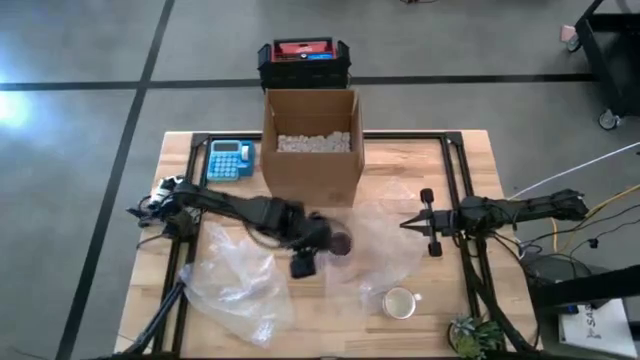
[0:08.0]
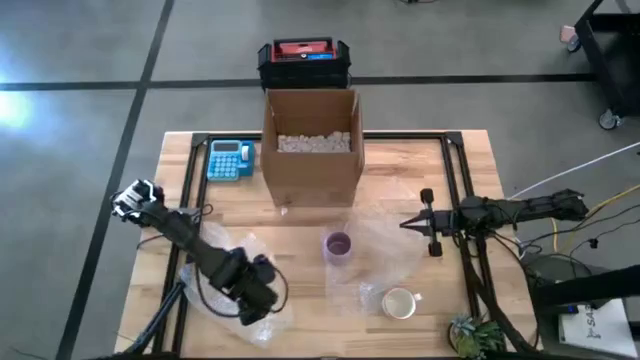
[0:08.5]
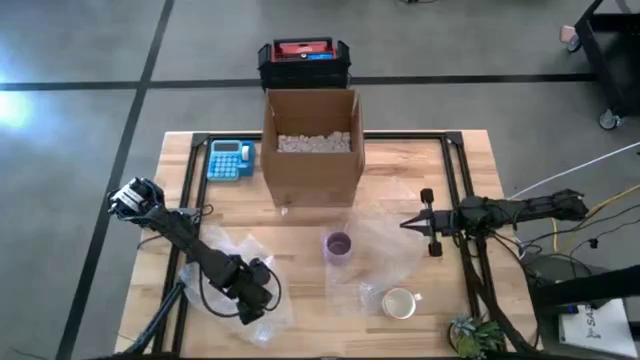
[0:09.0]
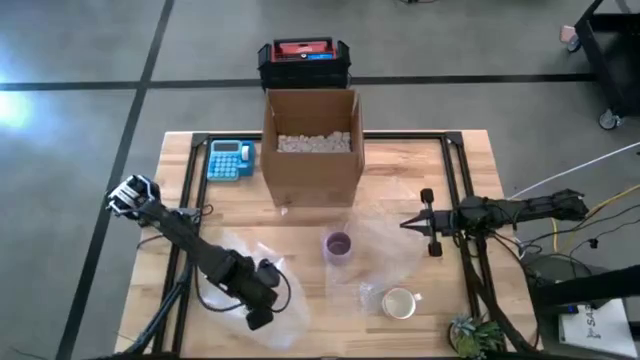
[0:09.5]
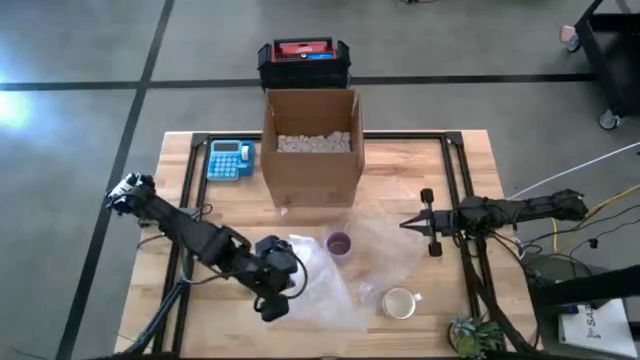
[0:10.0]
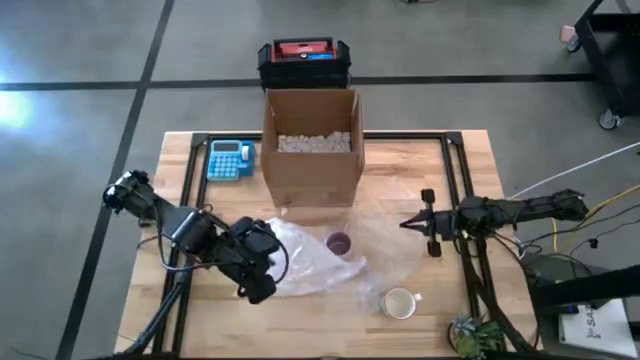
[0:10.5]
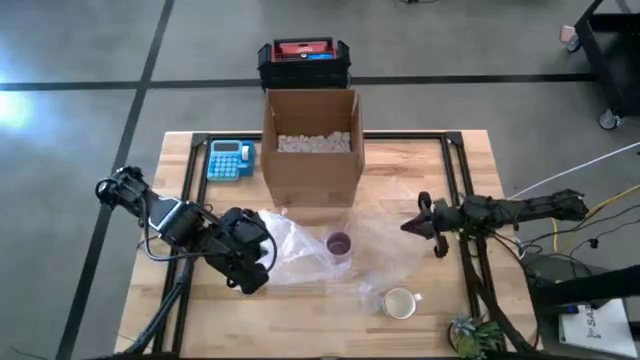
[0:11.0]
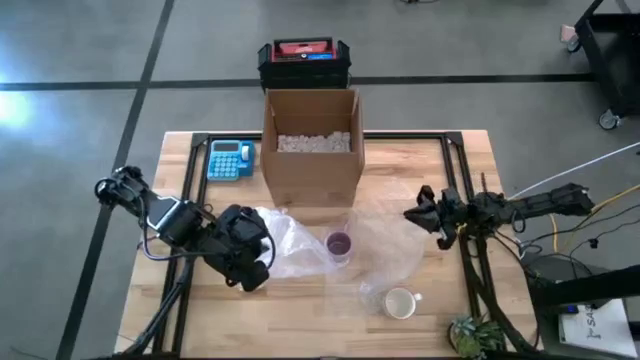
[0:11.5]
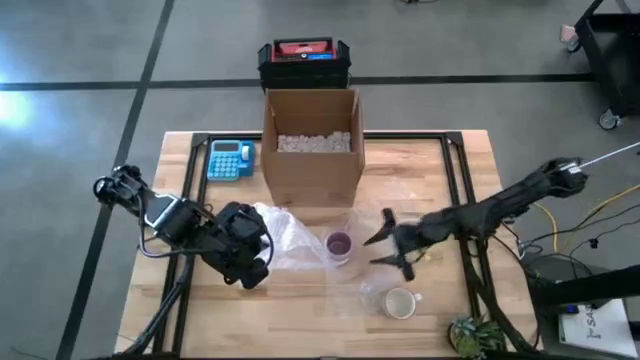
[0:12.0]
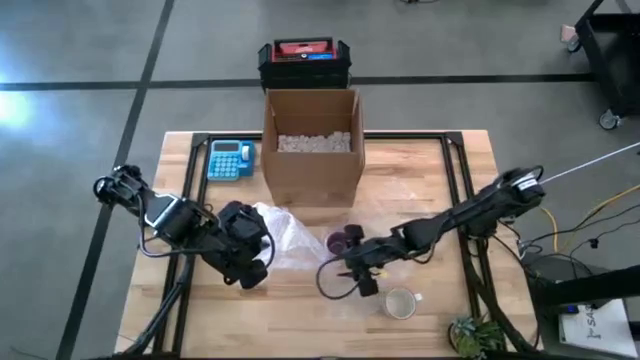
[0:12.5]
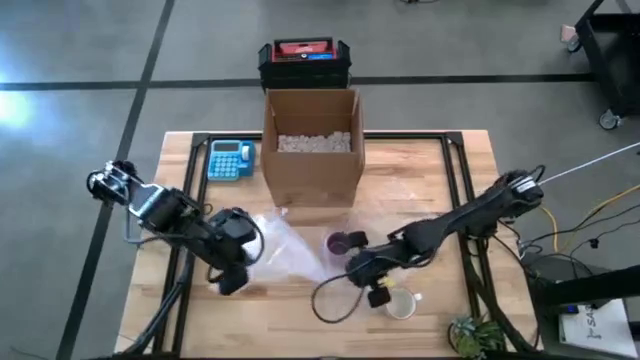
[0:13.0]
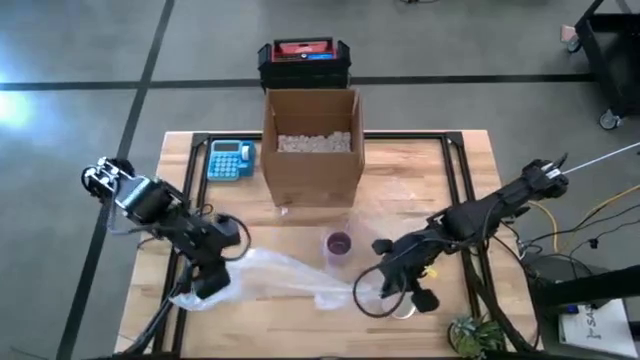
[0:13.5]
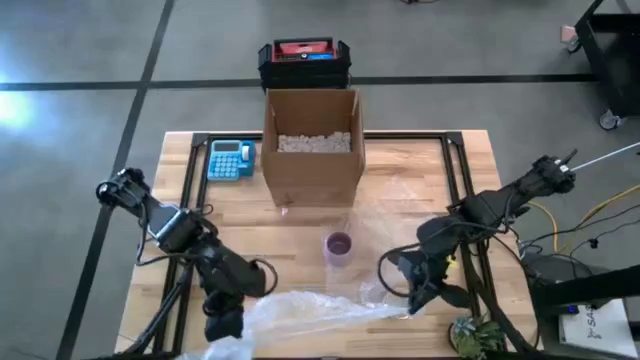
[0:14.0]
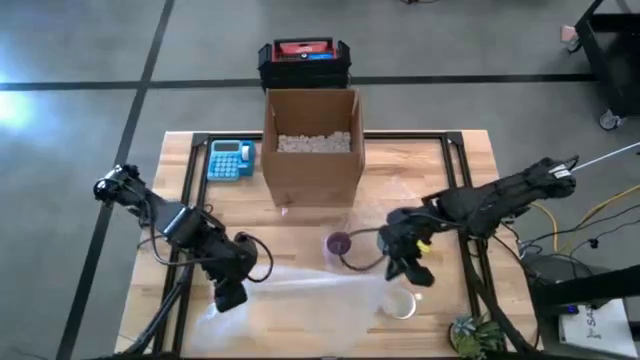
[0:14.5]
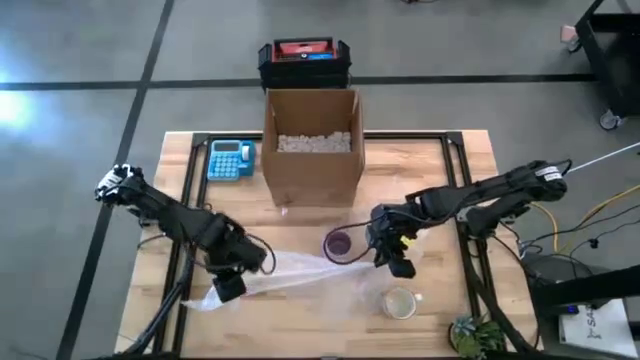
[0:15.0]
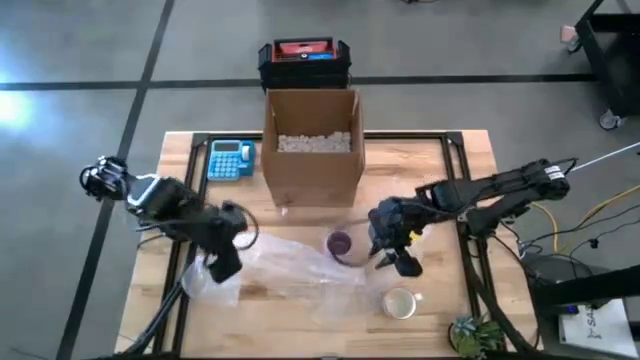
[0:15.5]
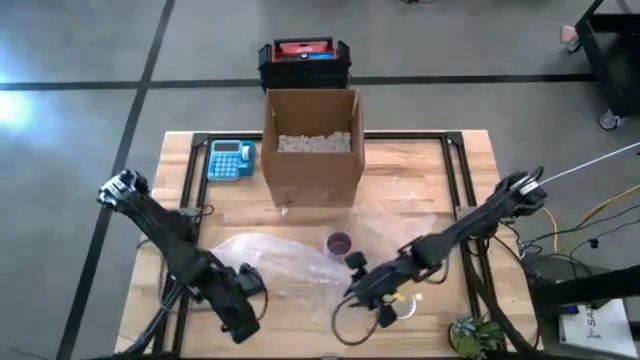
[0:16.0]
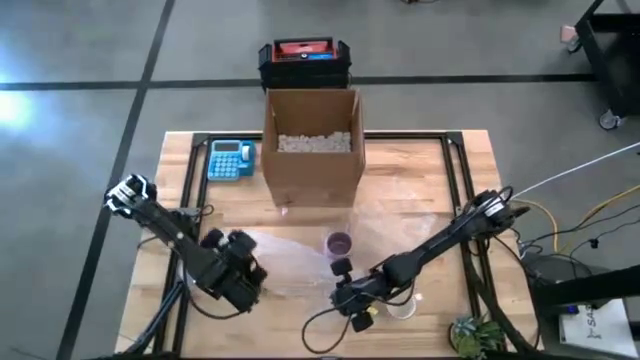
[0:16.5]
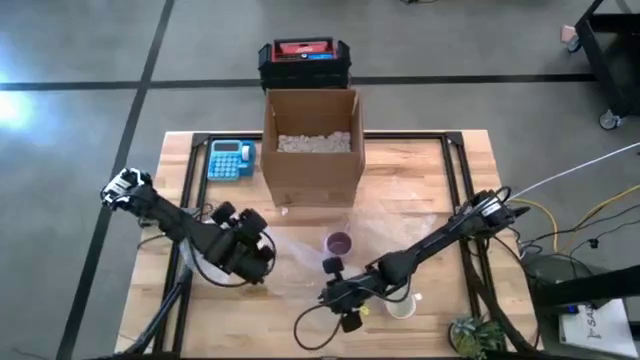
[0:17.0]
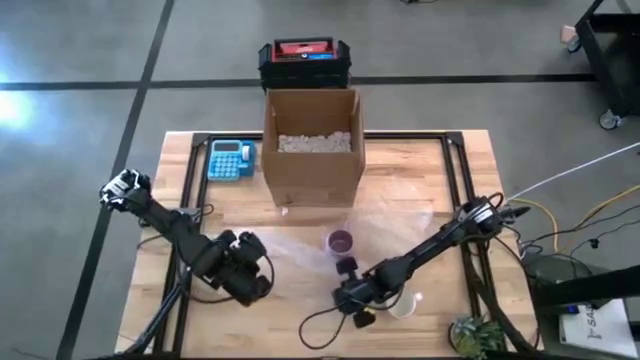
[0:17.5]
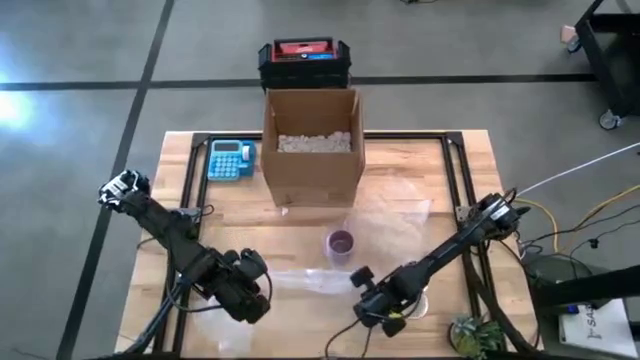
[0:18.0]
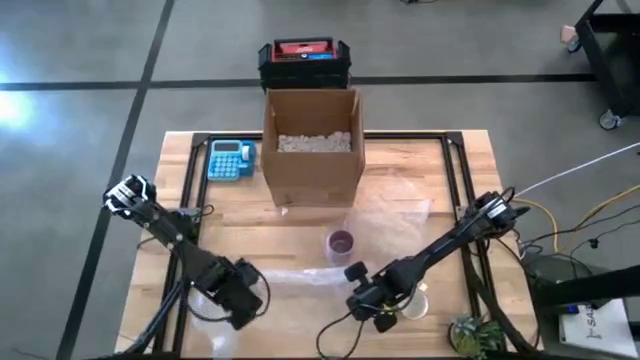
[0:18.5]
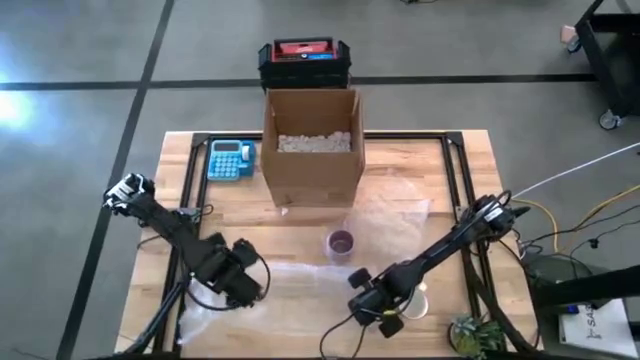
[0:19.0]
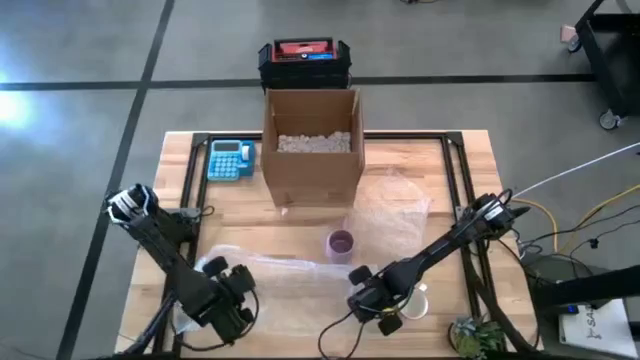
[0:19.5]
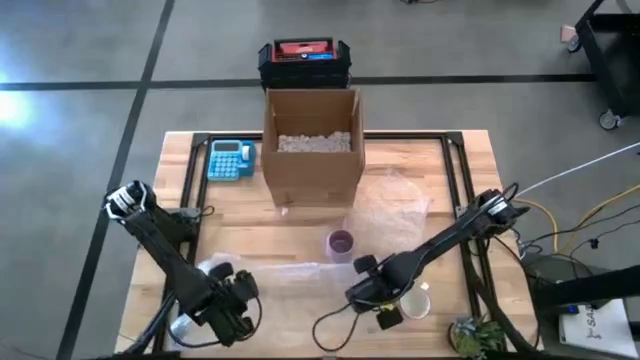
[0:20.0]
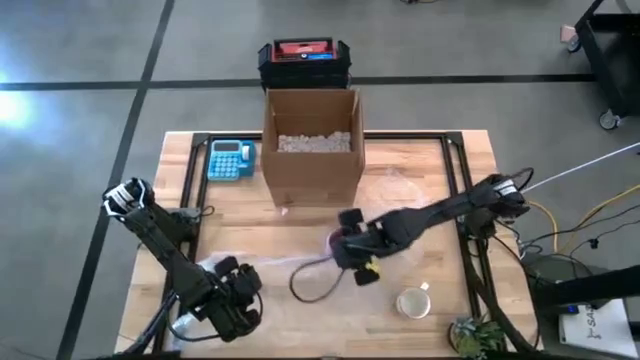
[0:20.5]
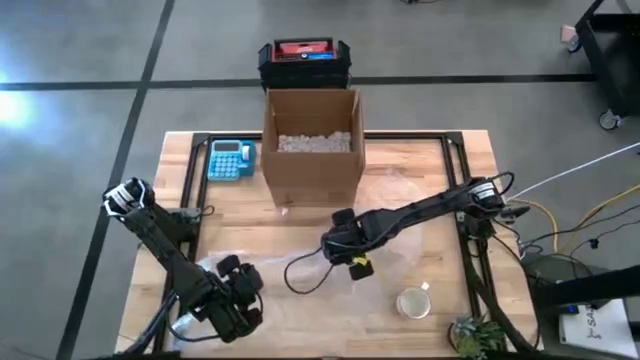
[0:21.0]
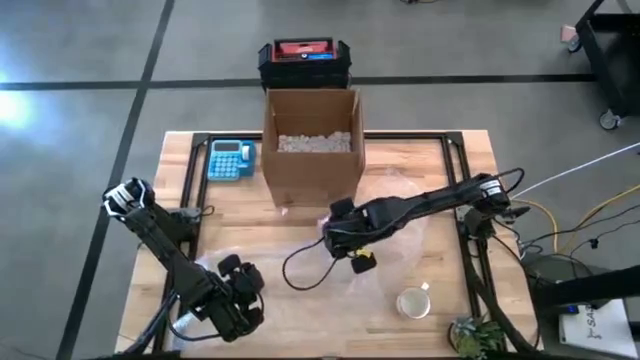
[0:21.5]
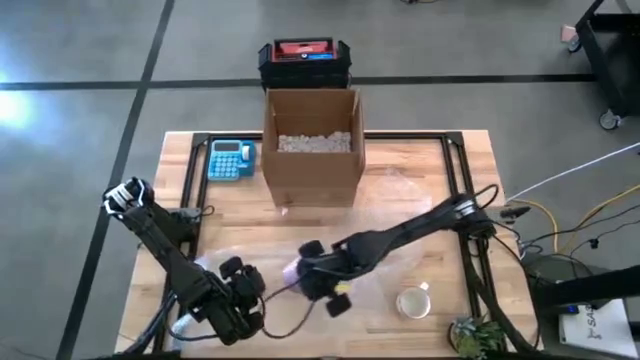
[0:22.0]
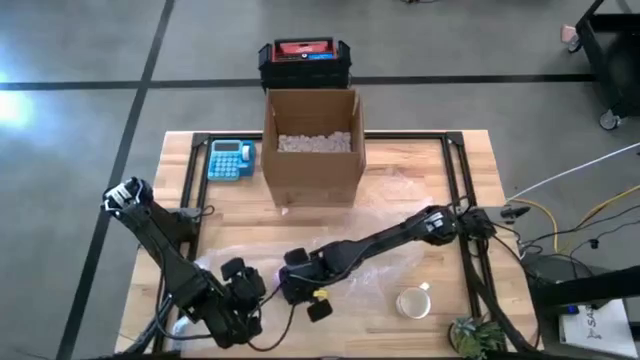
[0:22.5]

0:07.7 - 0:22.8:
Task: wrap mug
Prepare the transparent bubble wrap to wrap the purple mug

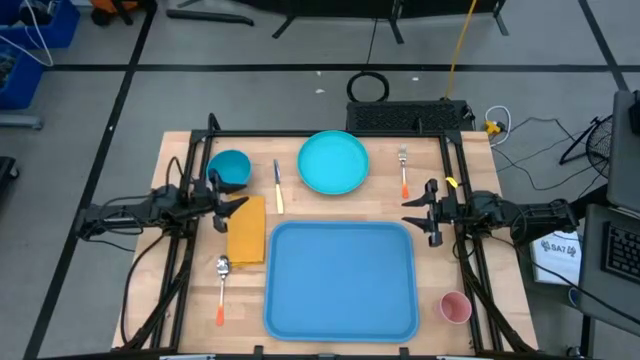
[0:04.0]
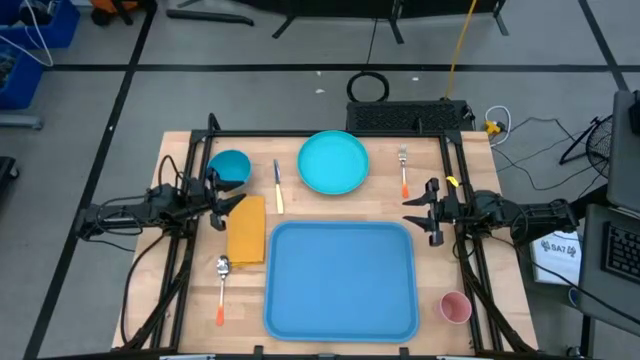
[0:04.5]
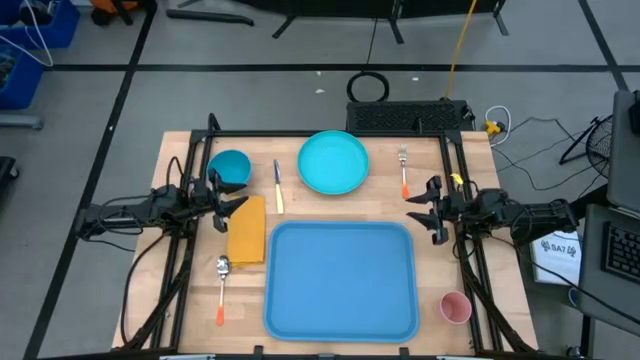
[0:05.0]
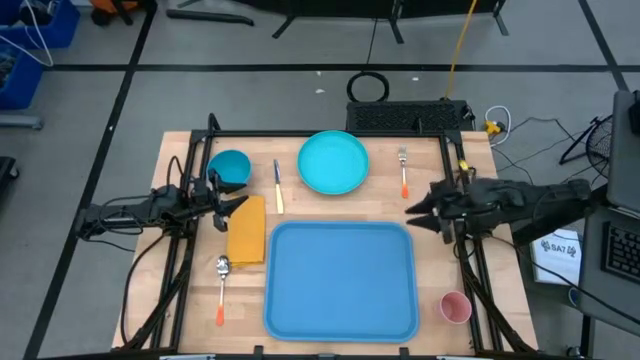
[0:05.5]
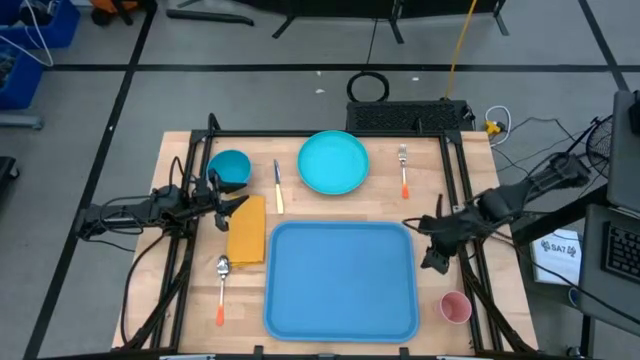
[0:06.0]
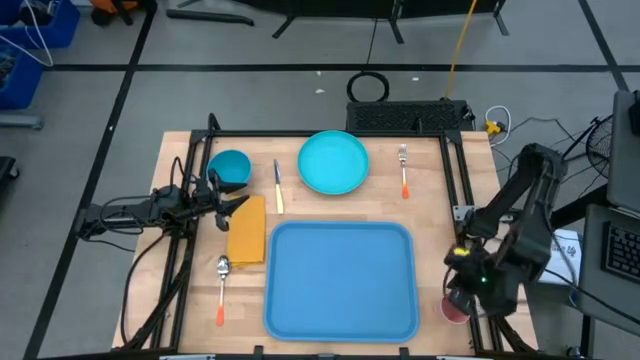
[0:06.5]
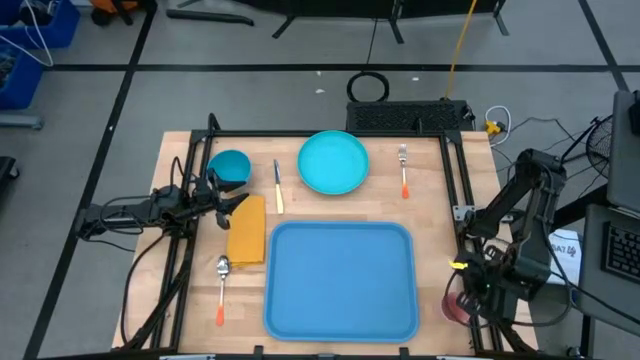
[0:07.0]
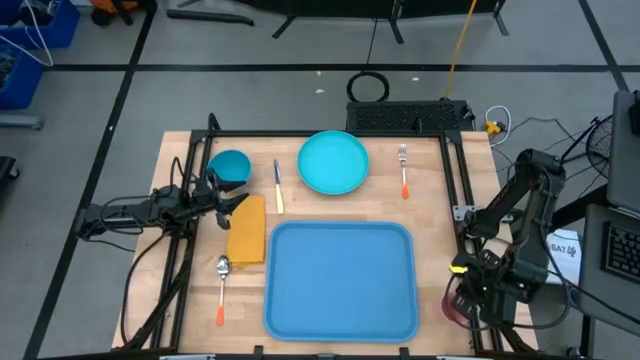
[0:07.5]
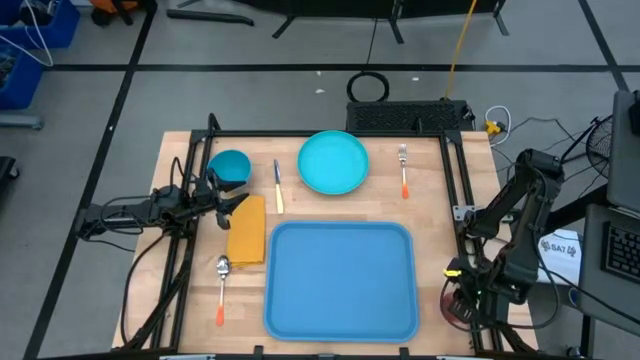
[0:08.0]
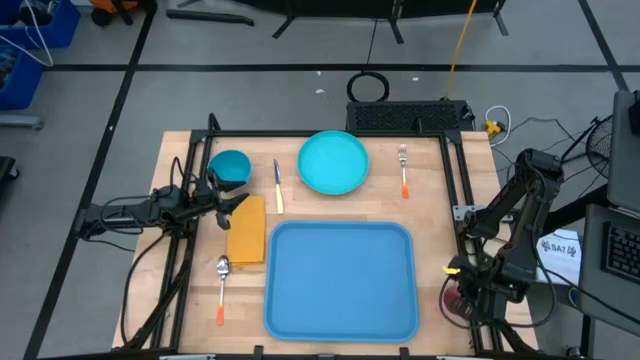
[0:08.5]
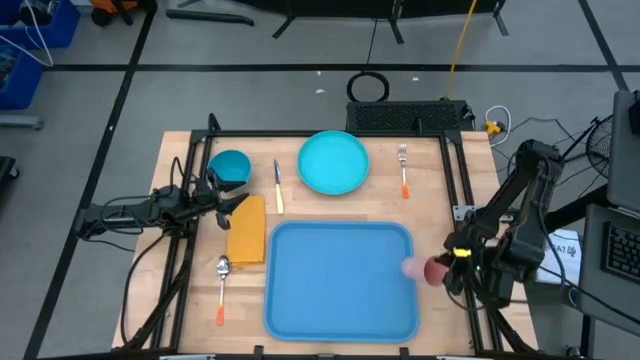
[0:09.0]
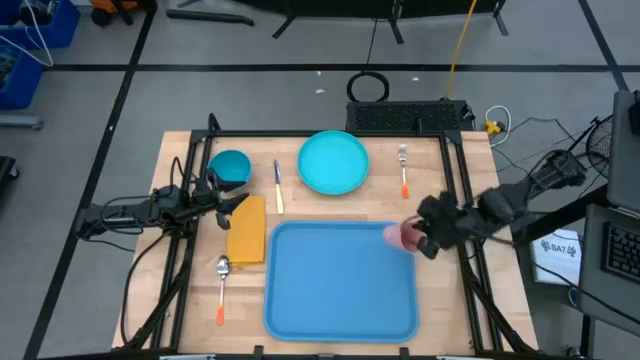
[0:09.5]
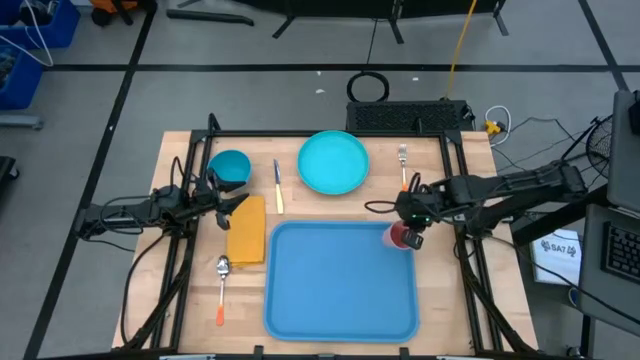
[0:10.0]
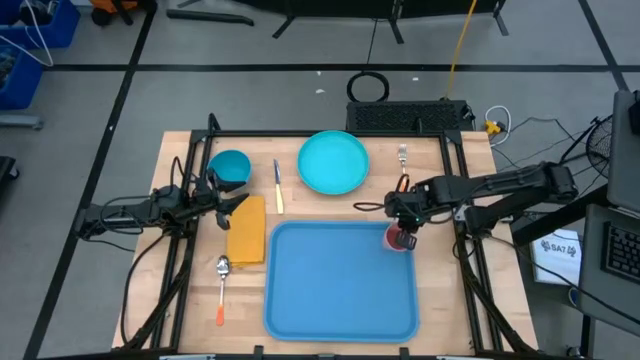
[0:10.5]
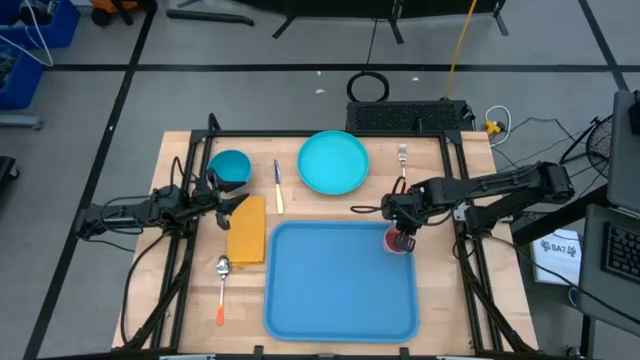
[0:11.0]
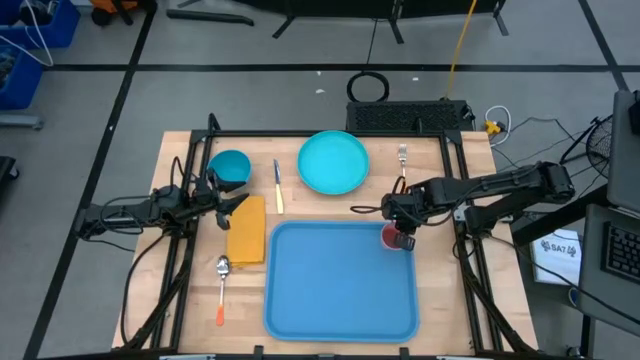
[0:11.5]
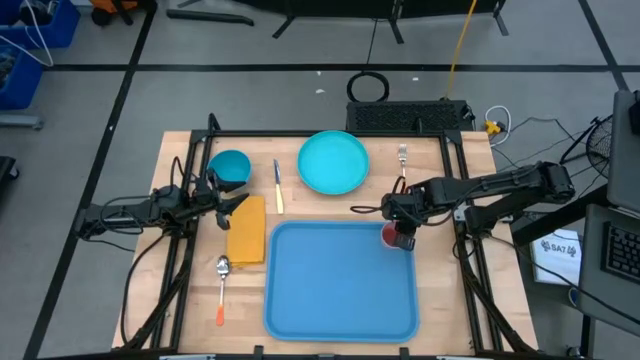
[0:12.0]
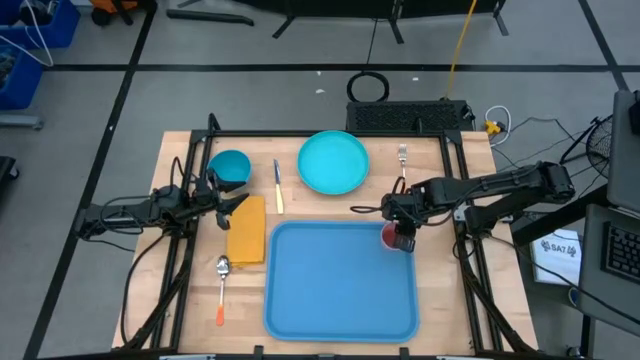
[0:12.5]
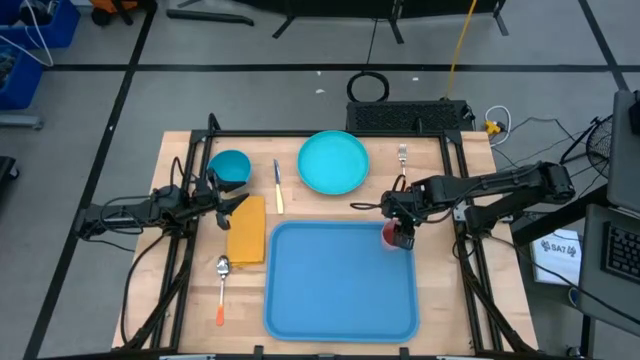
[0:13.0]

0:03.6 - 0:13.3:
Task: Set up tray
Put the pink cup on the top right of the blue tray
